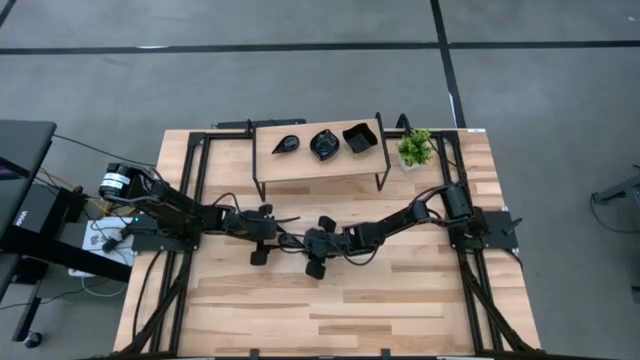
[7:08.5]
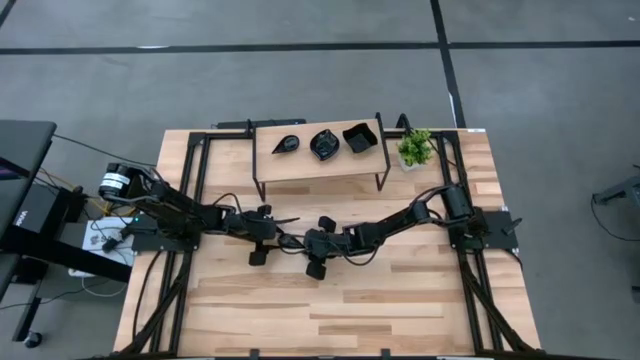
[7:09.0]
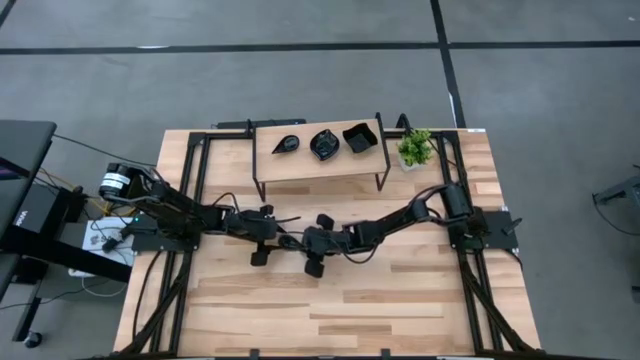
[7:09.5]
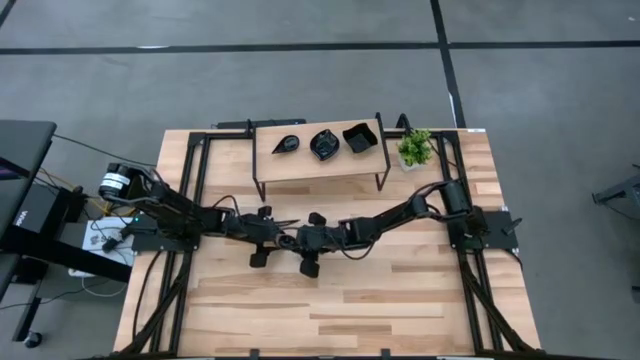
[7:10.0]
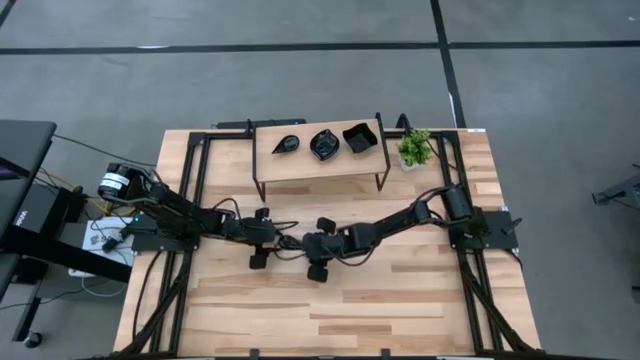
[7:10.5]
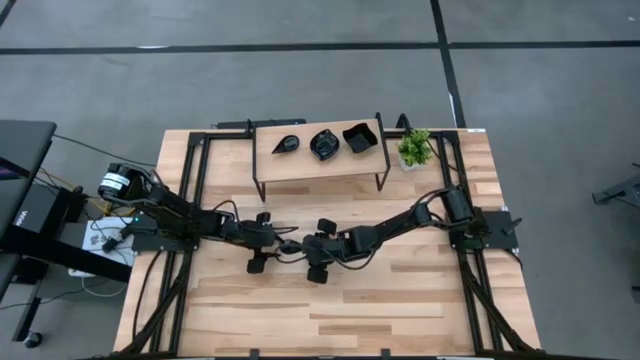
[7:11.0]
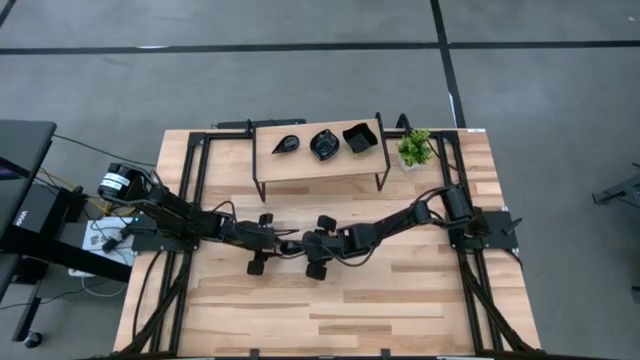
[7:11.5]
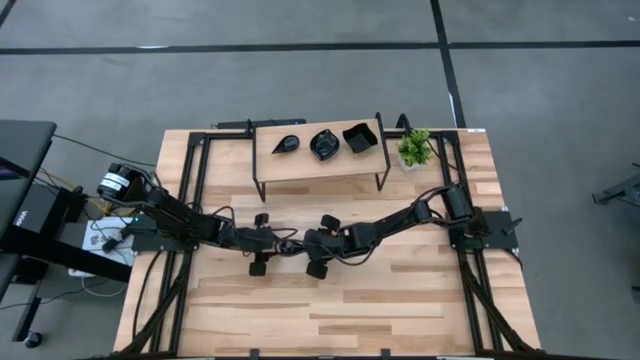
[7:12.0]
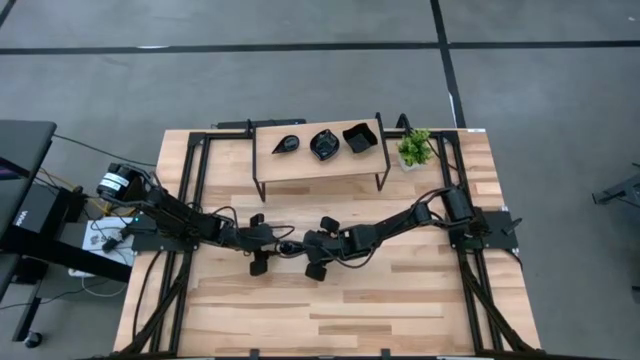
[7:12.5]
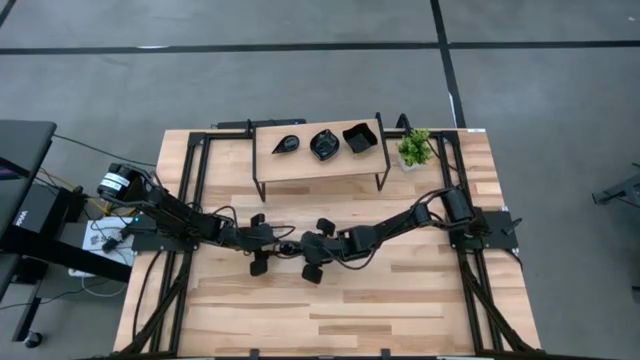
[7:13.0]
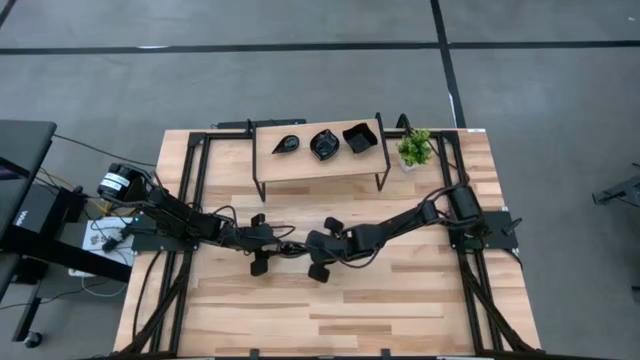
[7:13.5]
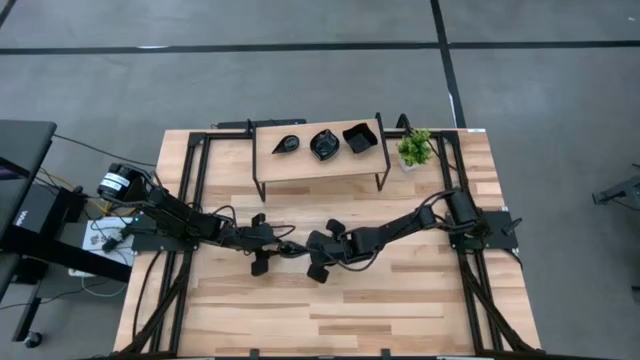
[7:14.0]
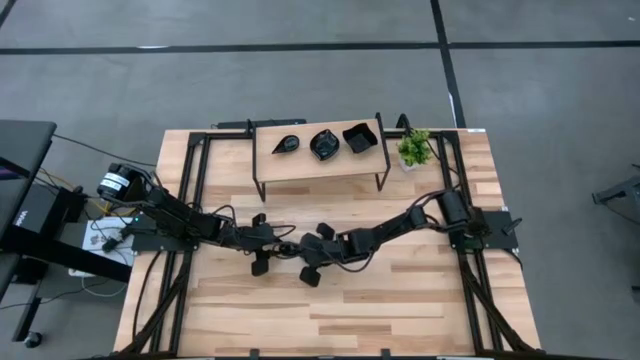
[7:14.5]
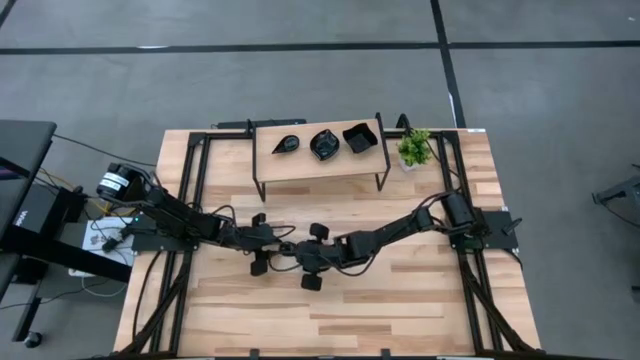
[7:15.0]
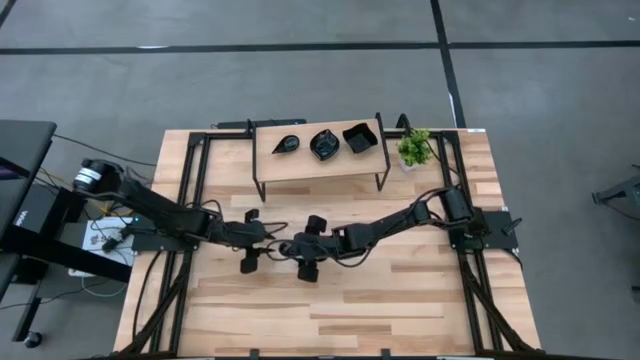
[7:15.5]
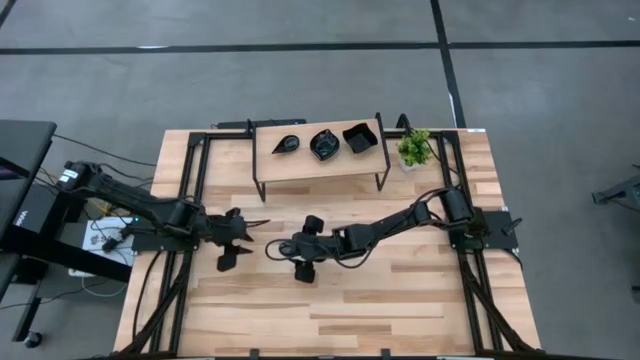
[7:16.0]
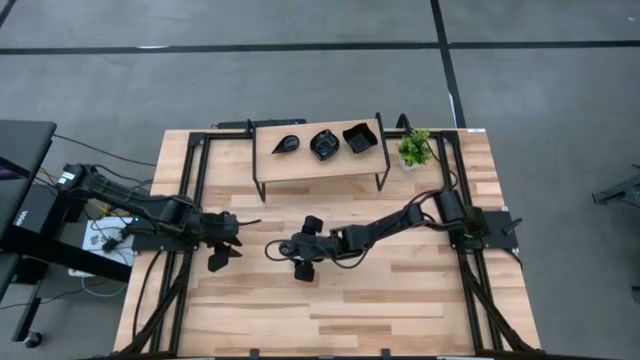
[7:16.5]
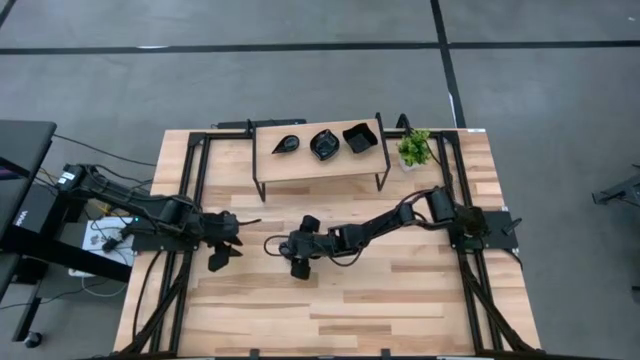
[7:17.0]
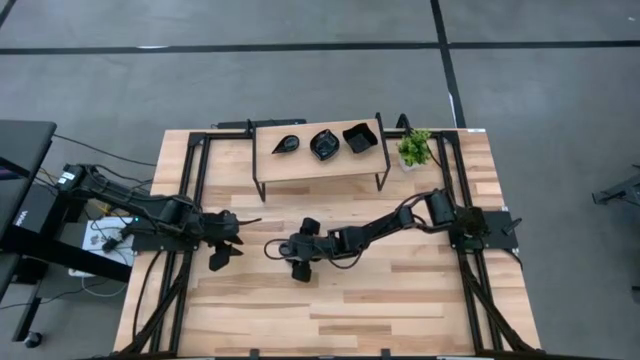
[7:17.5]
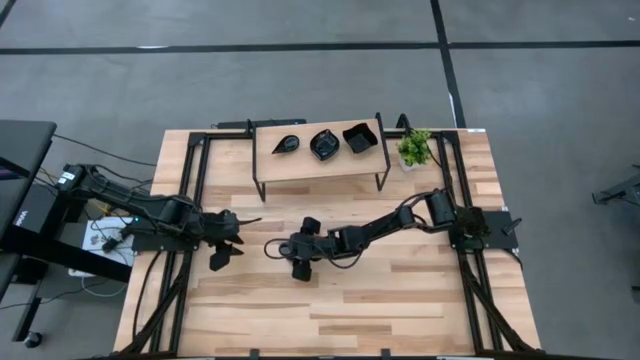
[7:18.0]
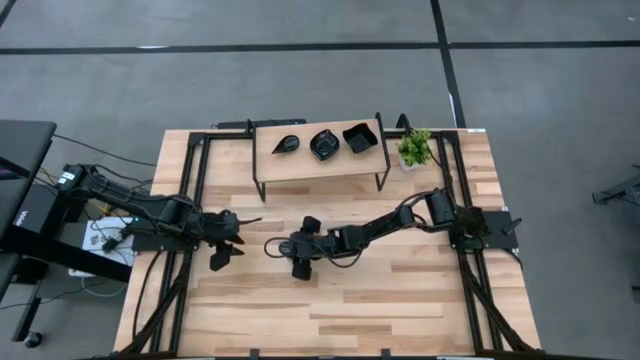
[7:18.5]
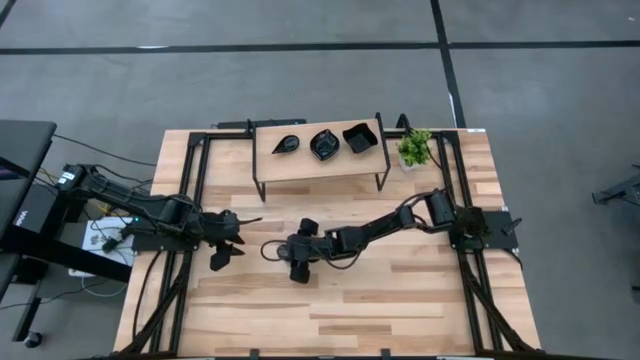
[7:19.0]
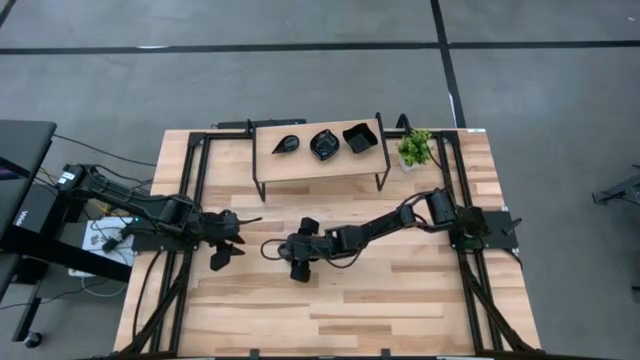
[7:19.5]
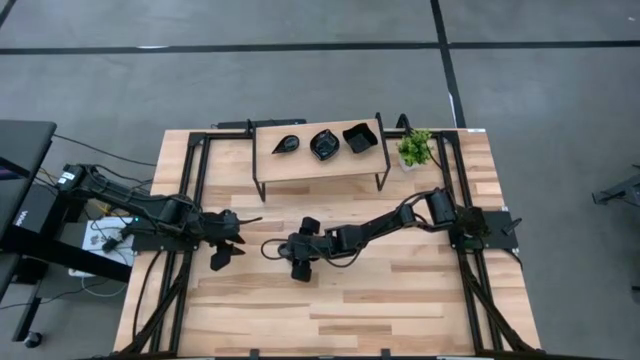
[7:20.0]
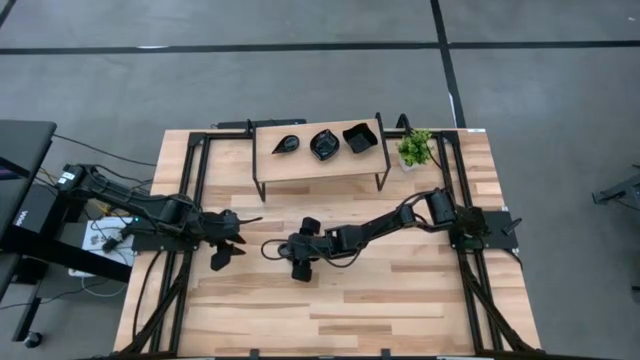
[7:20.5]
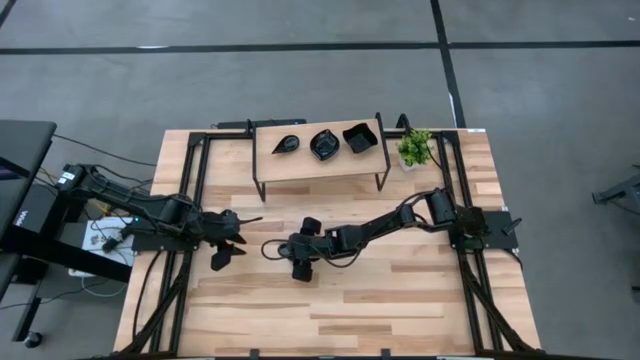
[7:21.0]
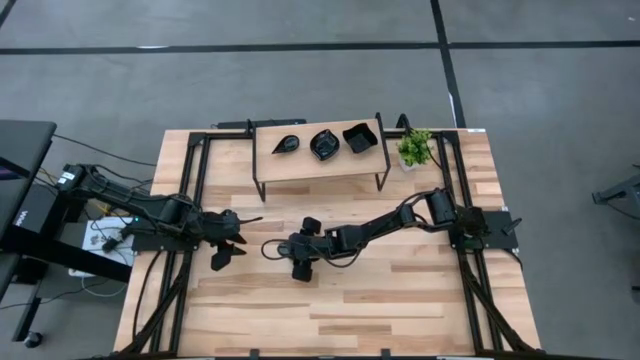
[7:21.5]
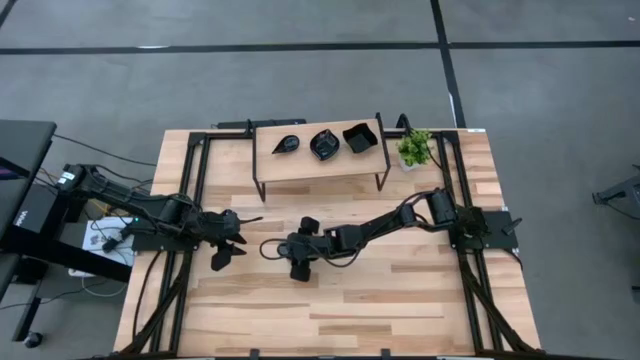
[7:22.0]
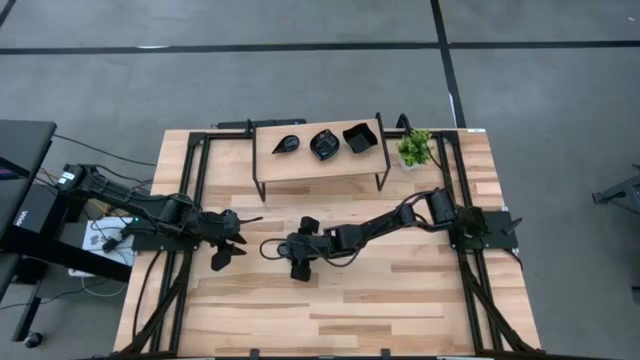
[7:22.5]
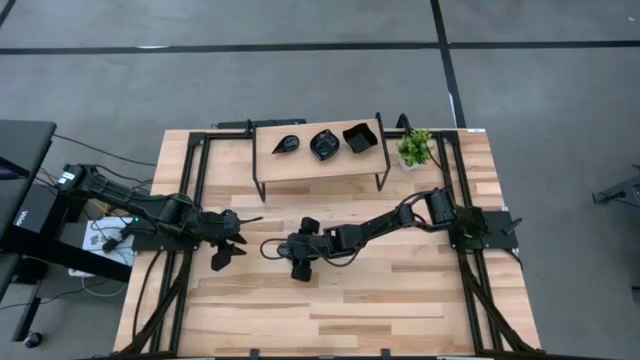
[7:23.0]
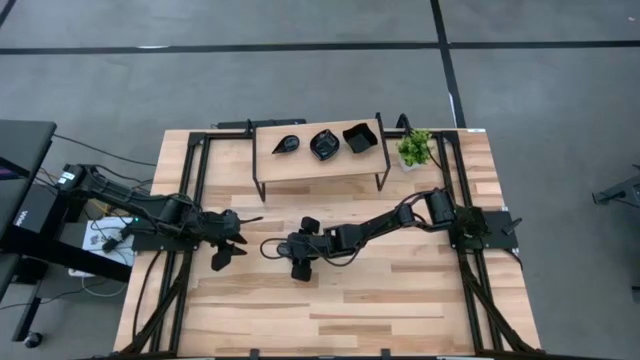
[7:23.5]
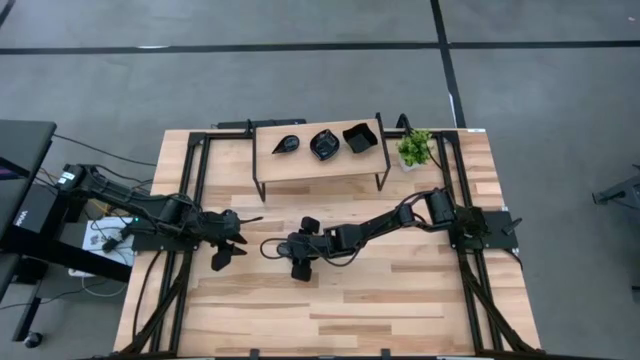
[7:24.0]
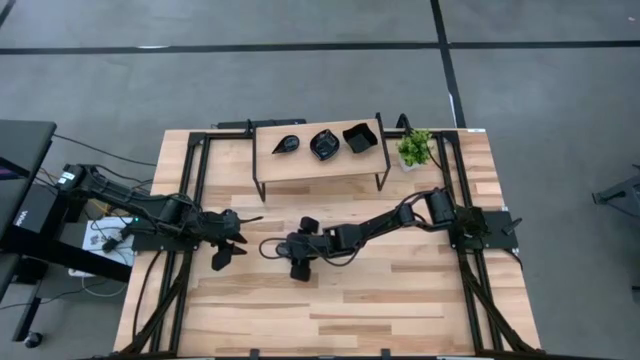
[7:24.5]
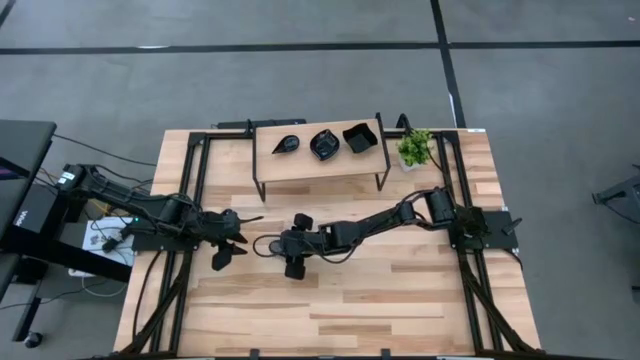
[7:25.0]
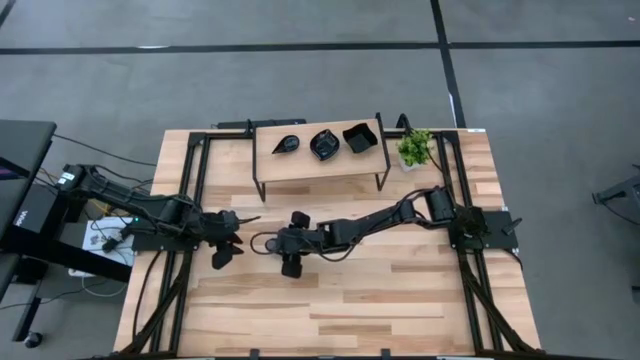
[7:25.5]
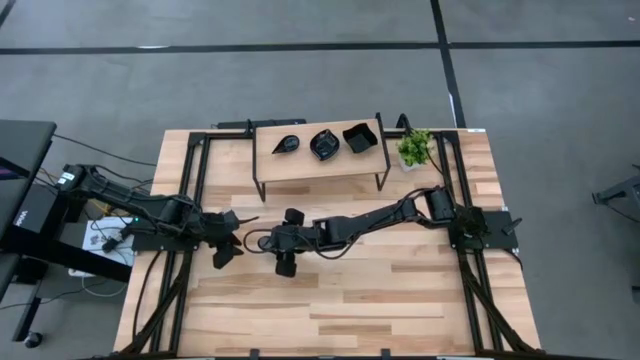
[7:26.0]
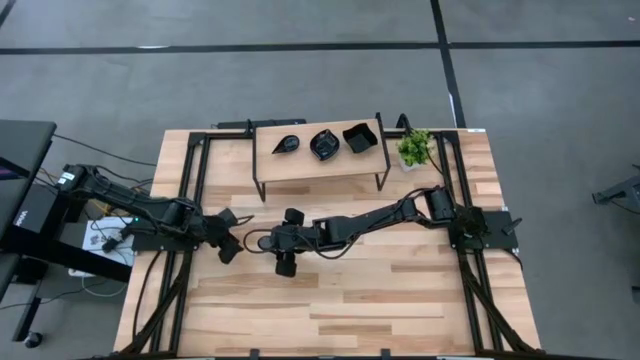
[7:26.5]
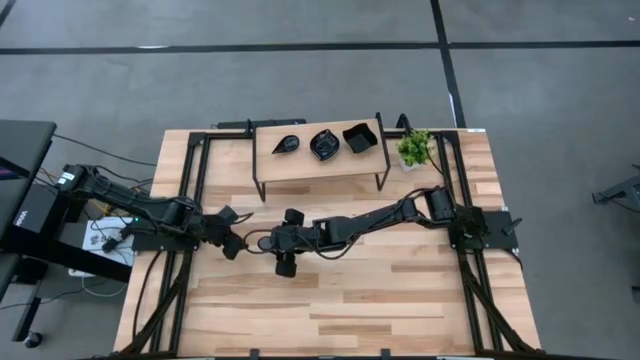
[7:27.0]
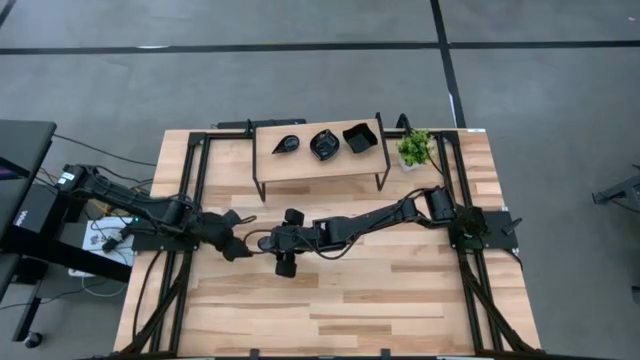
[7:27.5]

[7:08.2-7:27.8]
Task: Pick & Place Mini shaped plates
Stack the black drop shaped plate on the black drop shaped plate on the shelf
